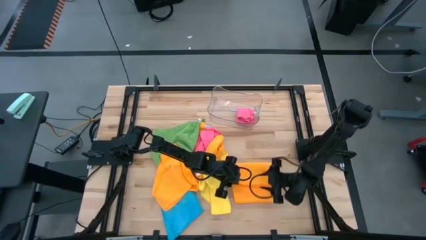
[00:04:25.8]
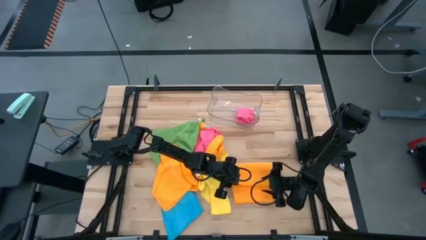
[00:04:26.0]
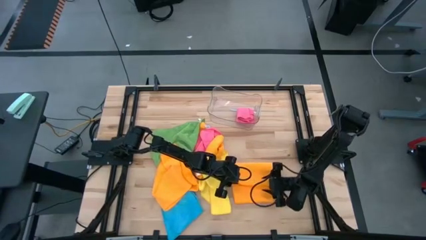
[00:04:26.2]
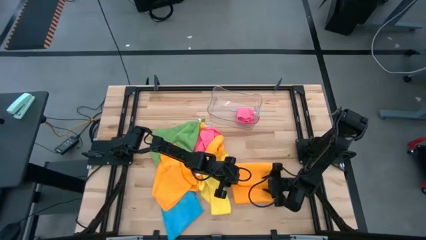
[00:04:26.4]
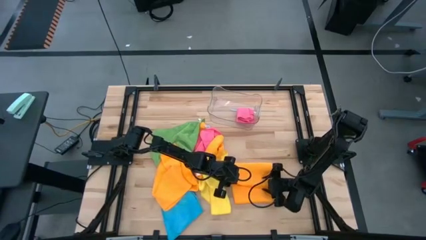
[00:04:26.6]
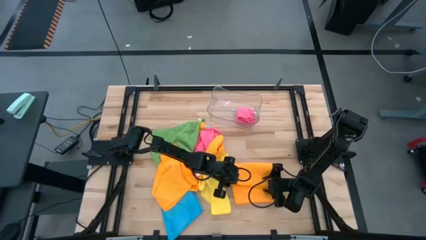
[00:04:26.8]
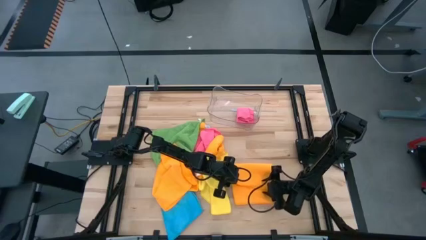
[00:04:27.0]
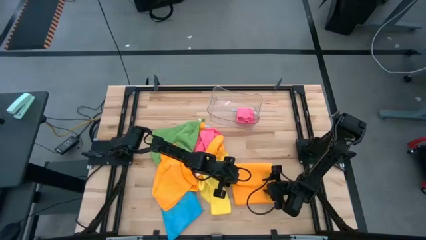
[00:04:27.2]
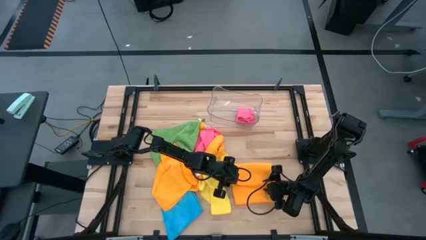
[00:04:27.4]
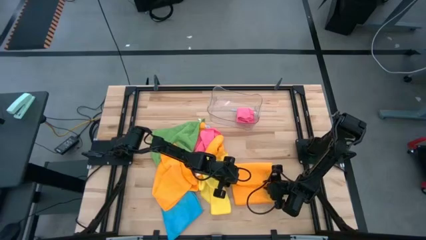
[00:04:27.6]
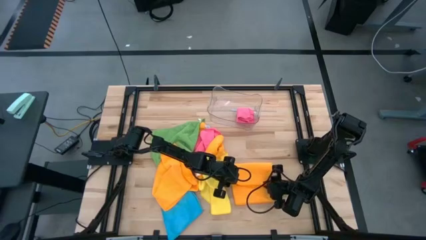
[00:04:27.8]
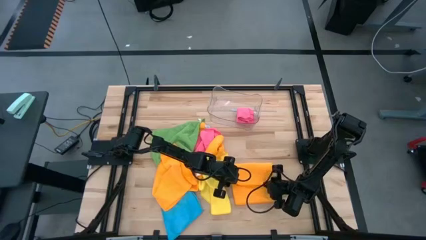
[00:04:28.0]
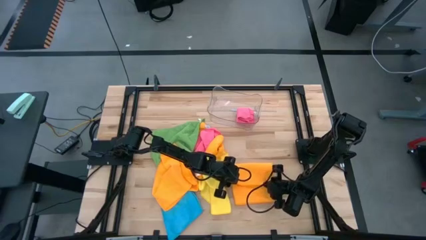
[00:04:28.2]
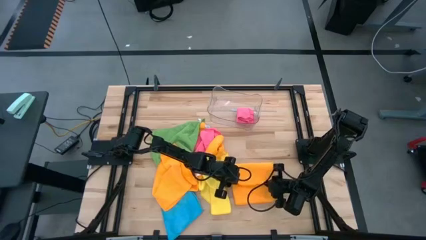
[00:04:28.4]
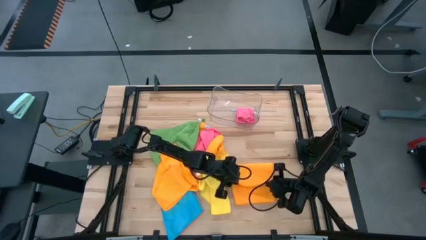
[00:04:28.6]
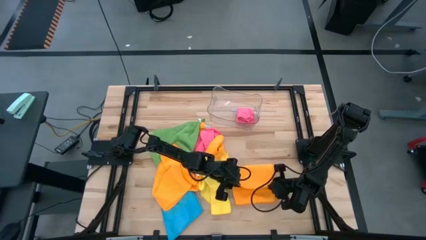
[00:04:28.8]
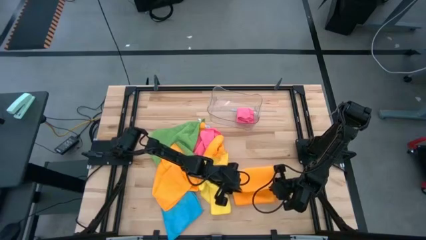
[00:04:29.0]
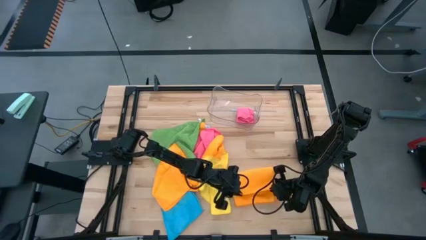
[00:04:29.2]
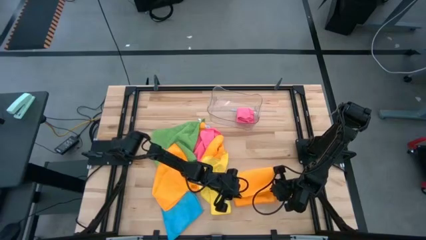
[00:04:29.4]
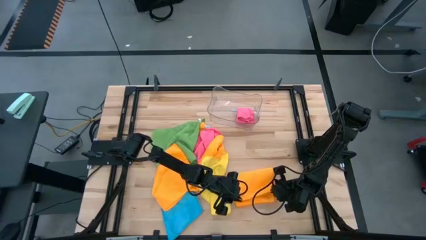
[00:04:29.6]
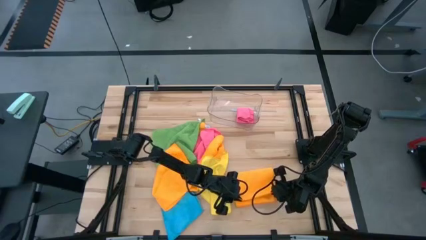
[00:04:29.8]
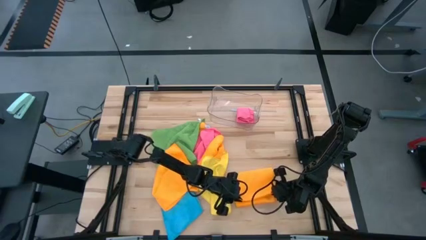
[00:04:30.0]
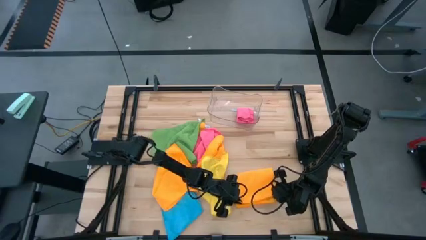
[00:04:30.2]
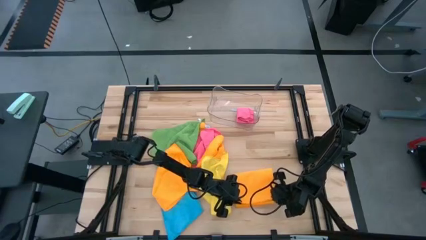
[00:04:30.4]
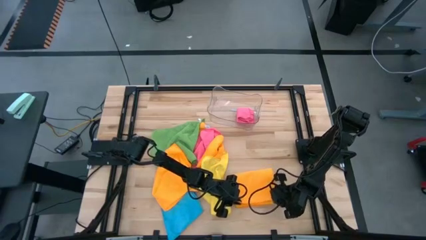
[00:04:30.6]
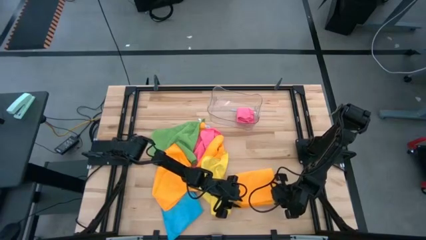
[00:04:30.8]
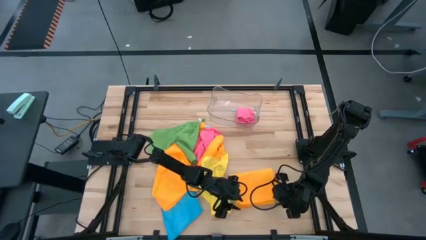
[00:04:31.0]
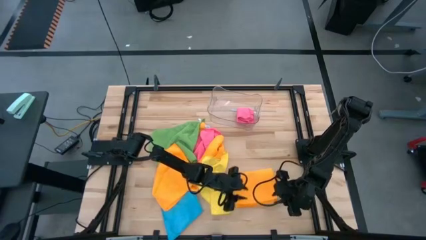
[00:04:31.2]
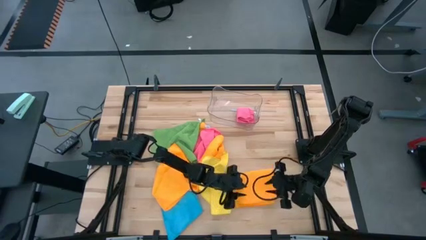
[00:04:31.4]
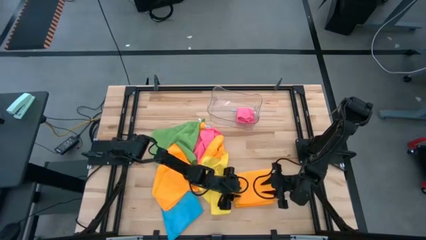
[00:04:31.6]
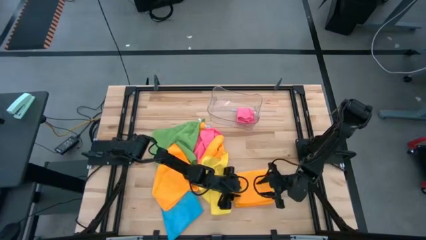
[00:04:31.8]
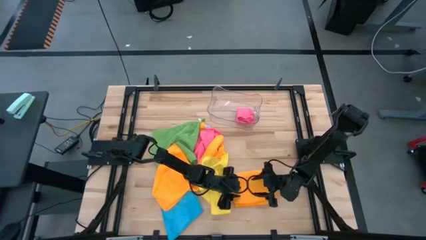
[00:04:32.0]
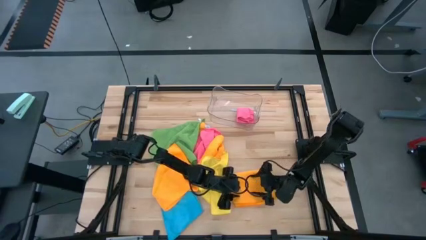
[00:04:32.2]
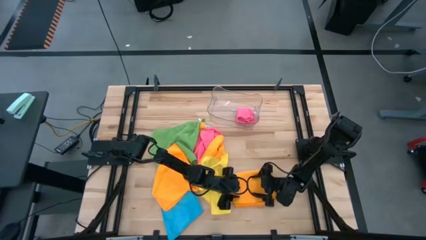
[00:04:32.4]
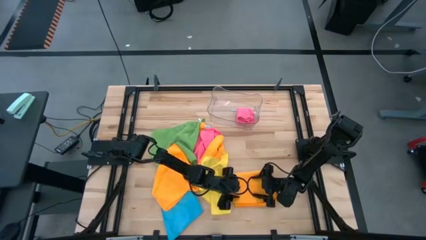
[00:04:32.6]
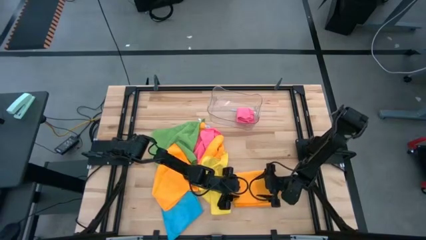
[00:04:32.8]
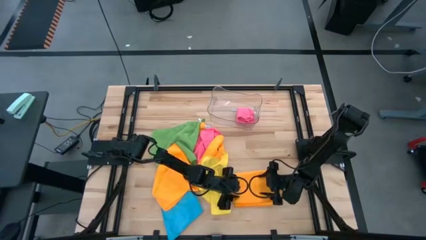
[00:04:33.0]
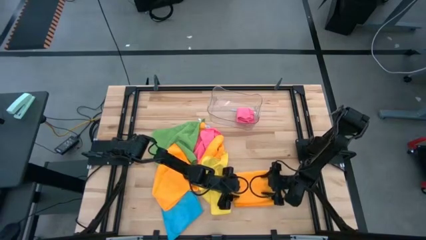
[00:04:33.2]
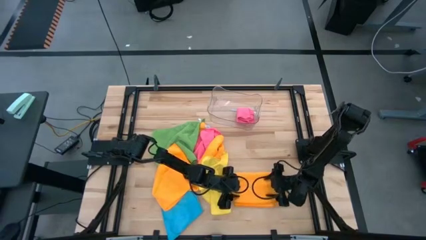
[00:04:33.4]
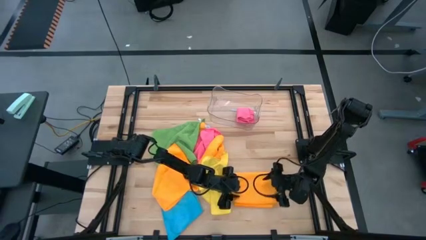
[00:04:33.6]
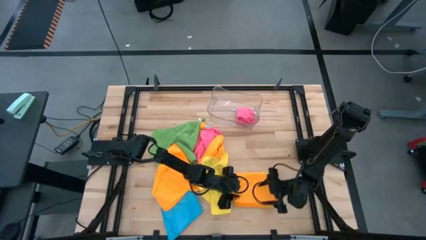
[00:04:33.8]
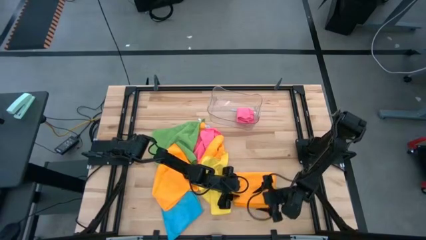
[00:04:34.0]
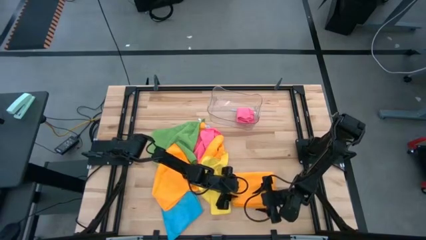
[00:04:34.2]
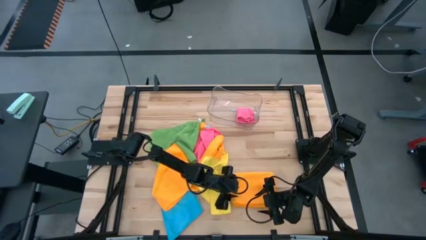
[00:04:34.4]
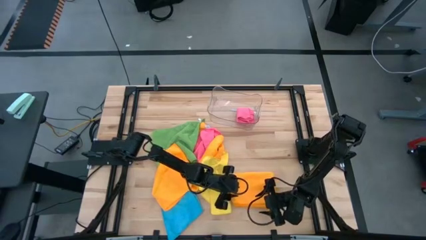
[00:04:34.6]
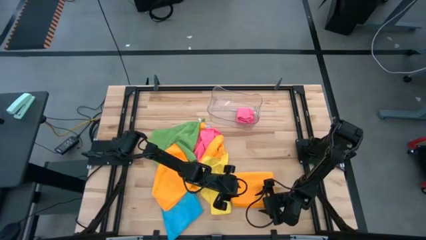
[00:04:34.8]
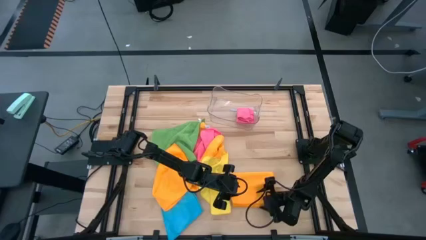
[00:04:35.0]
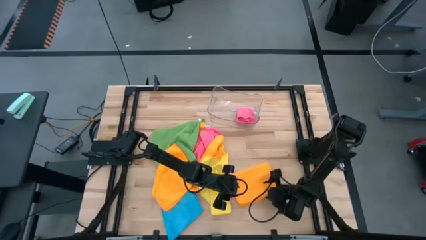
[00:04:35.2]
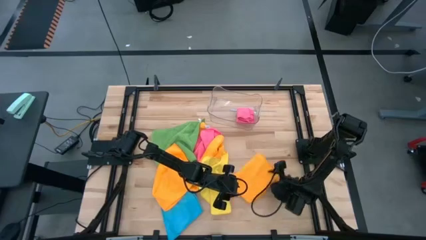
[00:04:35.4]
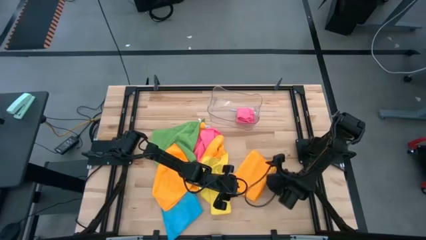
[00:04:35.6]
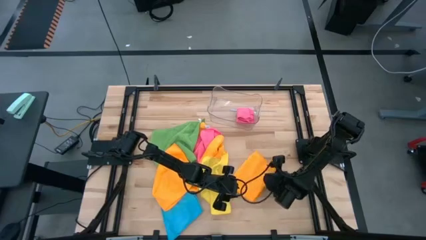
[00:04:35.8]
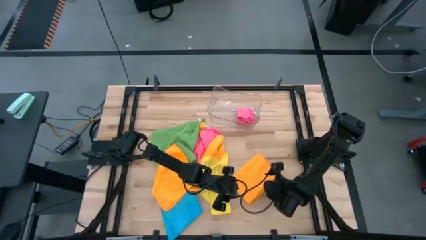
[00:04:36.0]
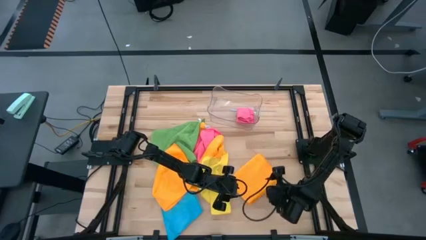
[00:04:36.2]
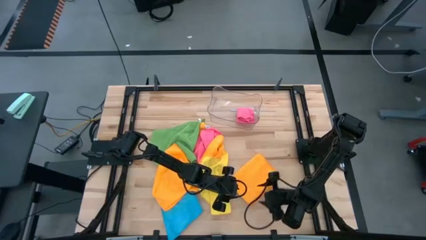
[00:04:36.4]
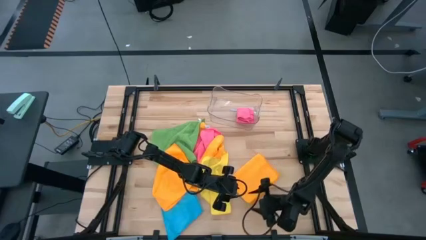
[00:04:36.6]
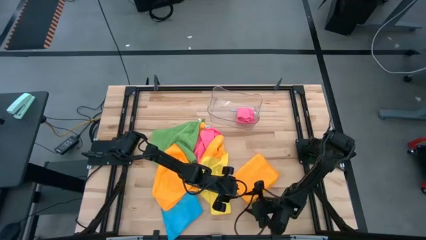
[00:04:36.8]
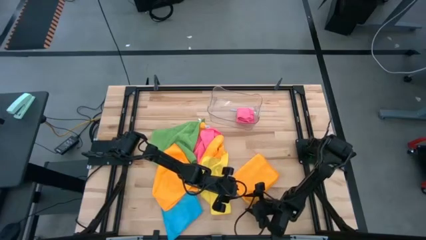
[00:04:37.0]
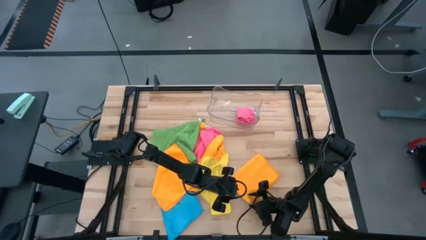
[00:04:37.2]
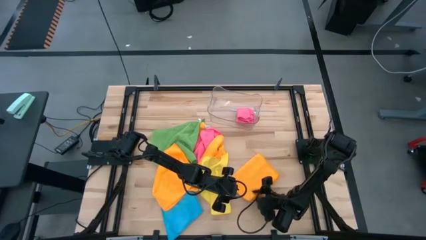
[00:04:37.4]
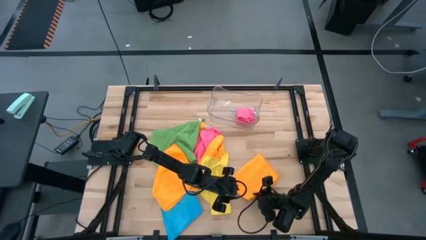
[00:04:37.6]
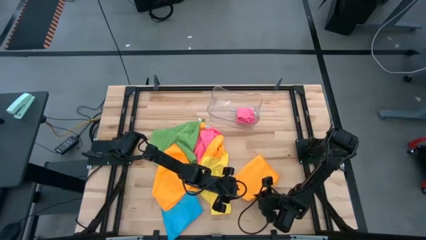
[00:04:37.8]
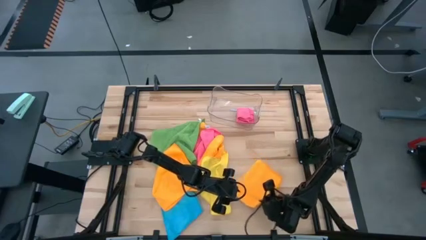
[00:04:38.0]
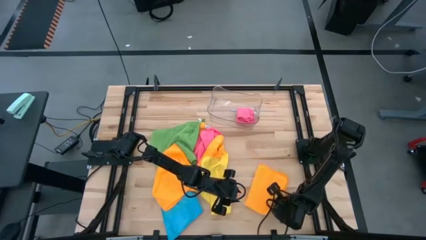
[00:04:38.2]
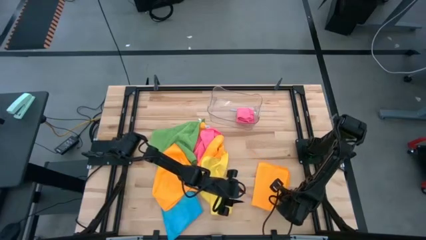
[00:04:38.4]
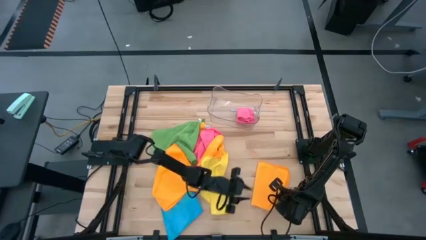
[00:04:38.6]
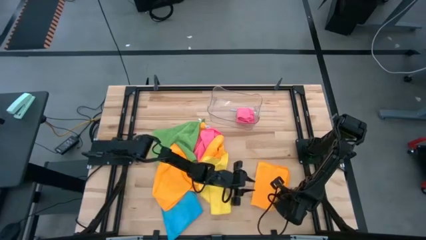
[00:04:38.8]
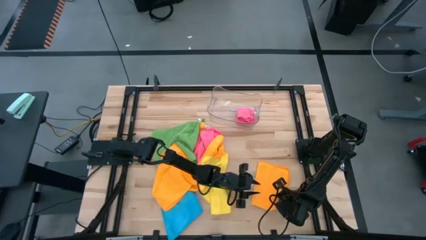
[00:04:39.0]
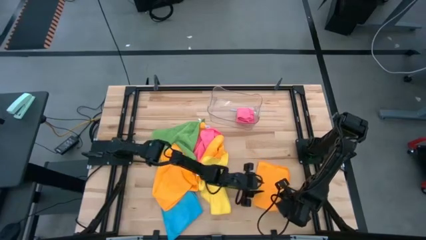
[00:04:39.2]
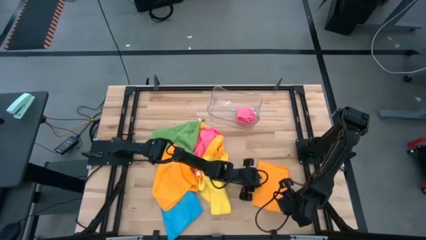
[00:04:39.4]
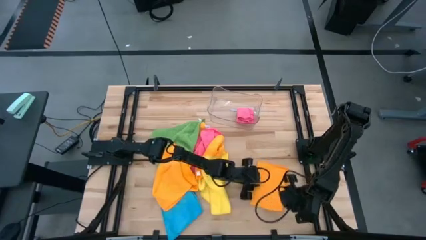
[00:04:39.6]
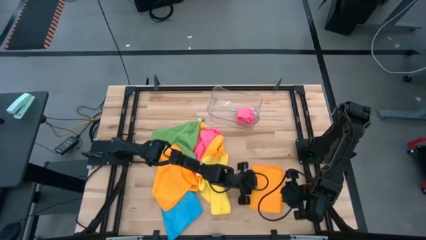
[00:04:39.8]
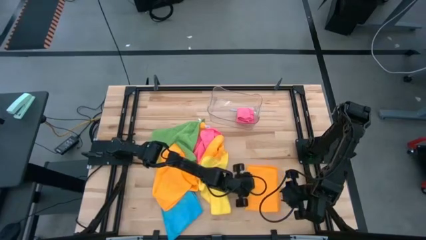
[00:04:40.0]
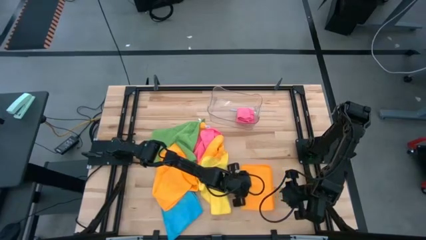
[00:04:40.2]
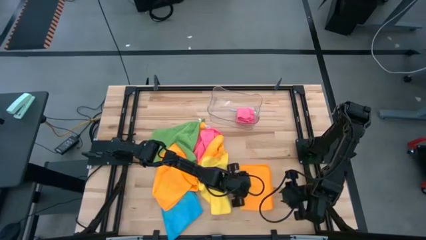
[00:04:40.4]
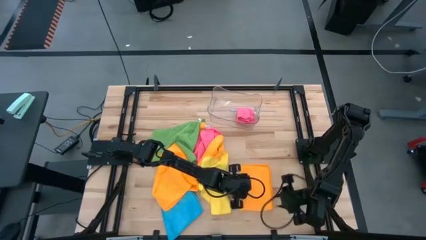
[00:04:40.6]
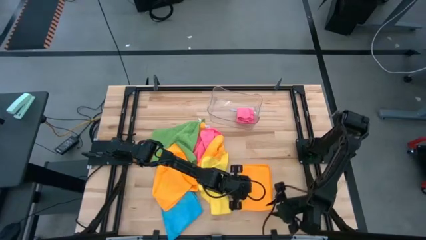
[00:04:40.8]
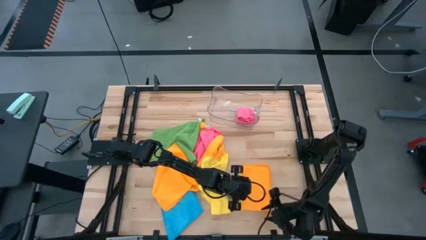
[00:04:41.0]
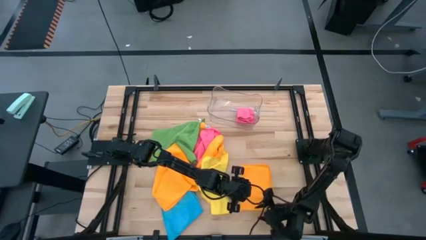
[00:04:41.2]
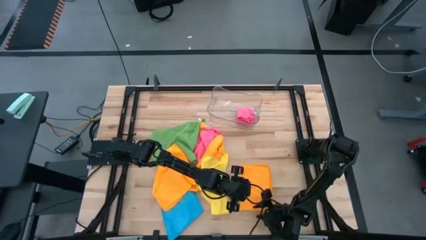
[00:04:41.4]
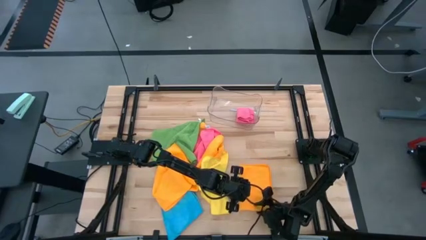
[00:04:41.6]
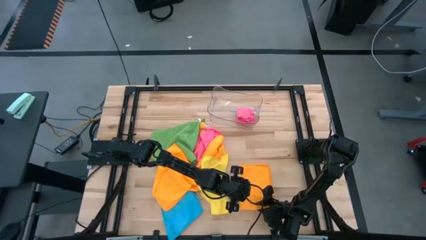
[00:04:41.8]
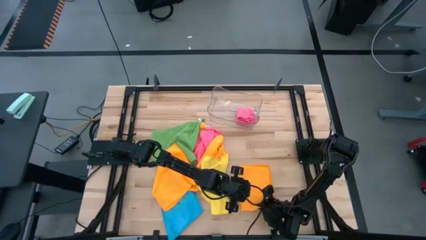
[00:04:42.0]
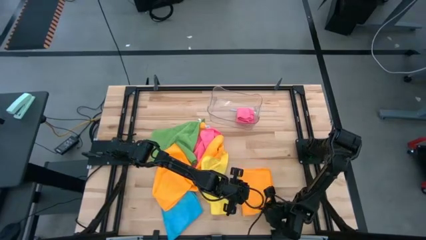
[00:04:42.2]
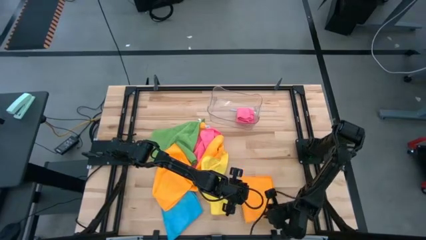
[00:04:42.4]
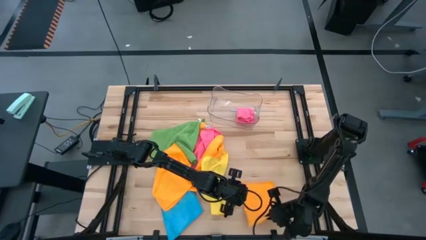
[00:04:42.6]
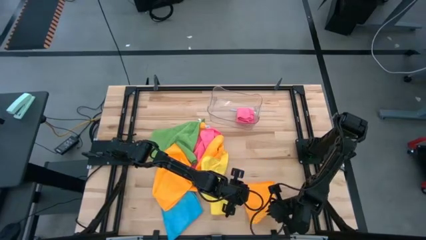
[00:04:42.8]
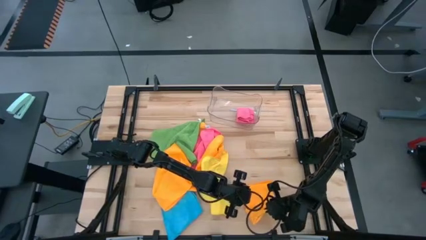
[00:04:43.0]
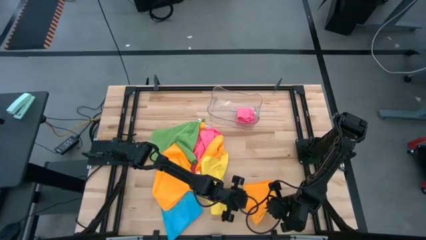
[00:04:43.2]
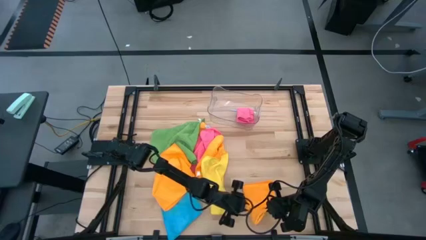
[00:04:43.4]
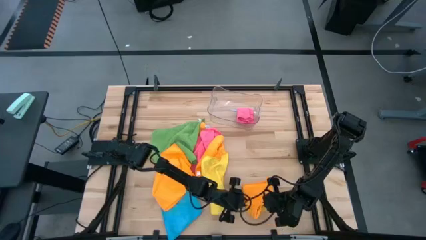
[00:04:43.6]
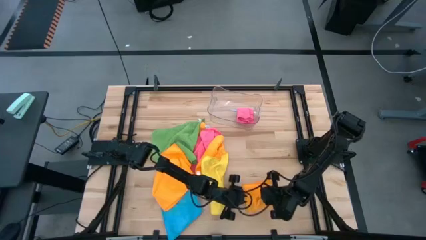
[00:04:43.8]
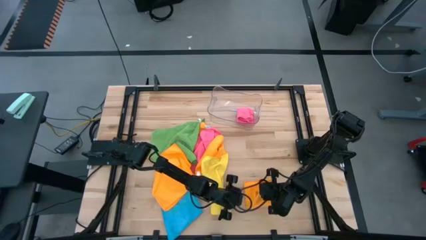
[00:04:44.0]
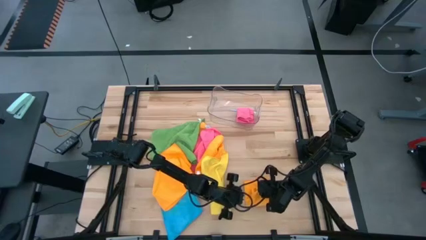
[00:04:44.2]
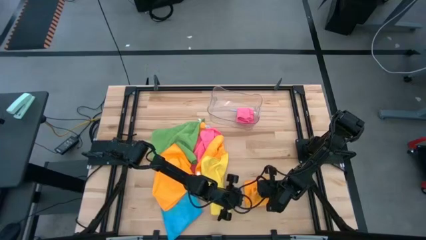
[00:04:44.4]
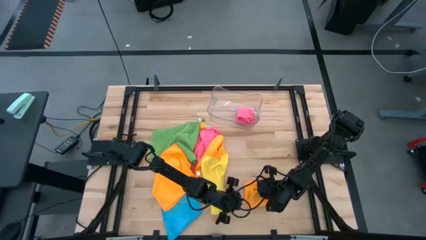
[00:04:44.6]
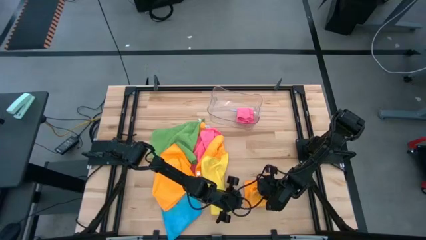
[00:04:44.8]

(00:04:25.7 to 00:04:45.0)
Task: Fold microfiber towels
Fold the right orange microfiber cloth
